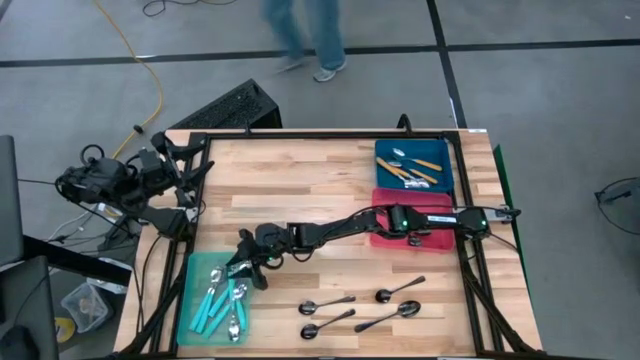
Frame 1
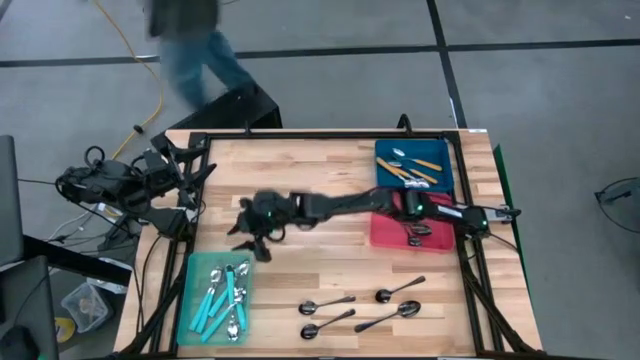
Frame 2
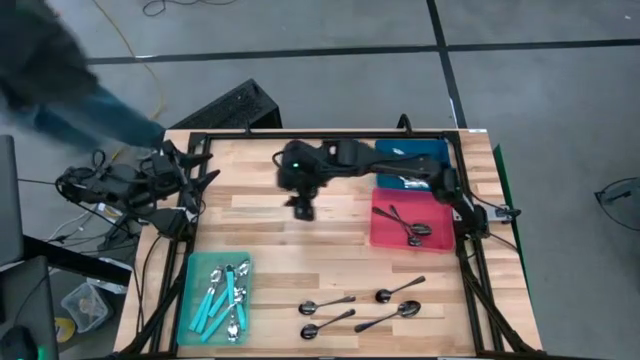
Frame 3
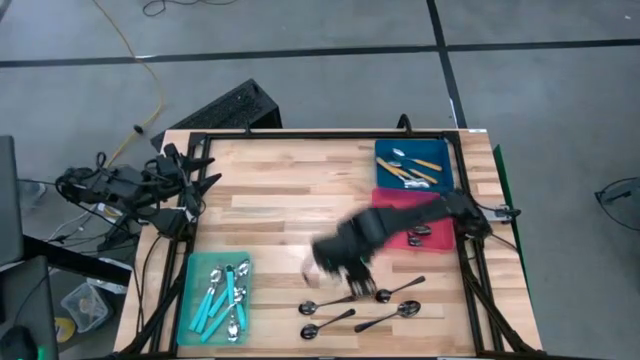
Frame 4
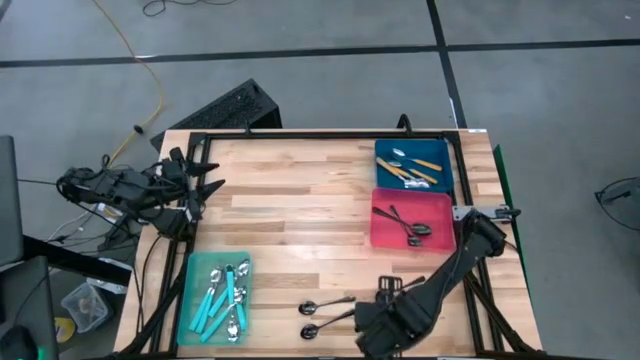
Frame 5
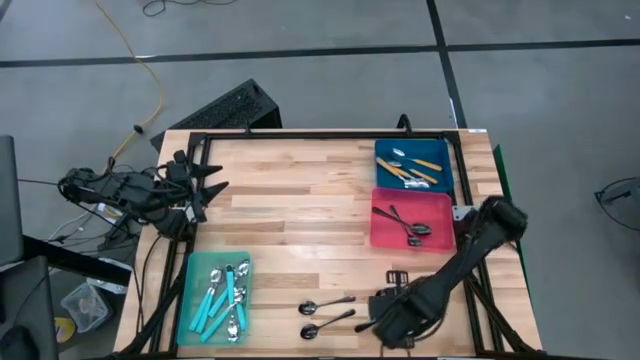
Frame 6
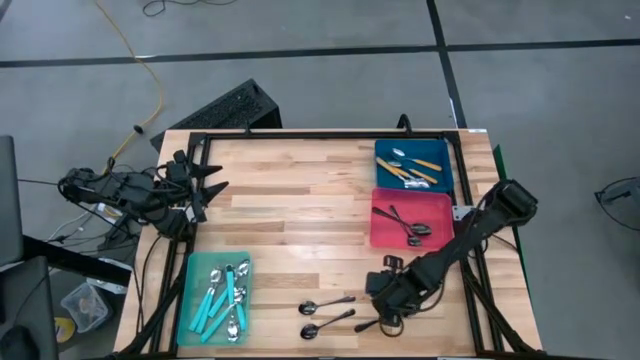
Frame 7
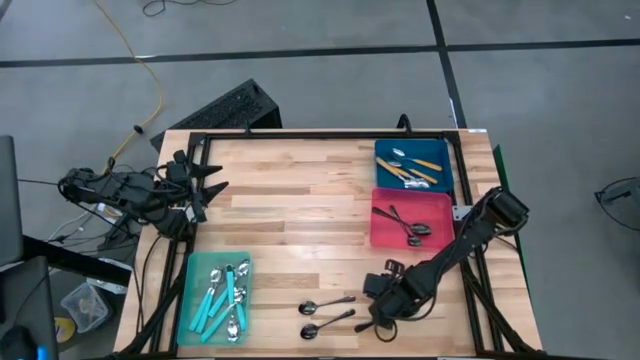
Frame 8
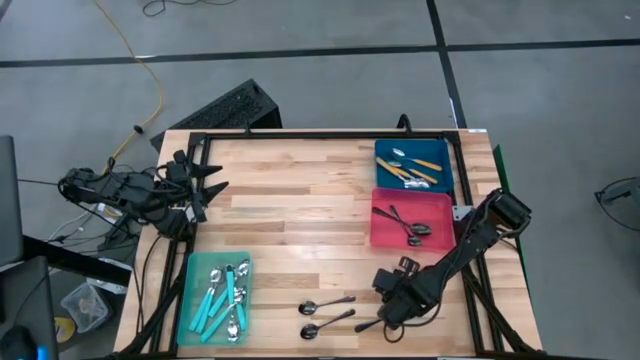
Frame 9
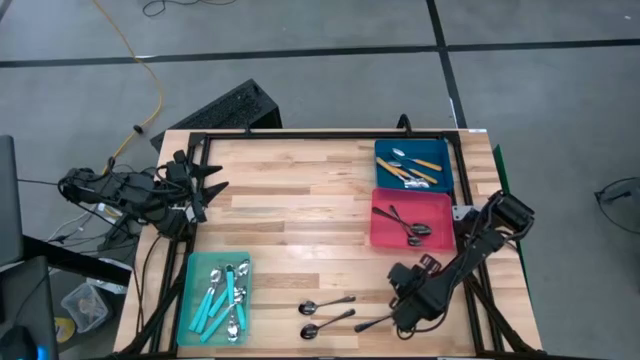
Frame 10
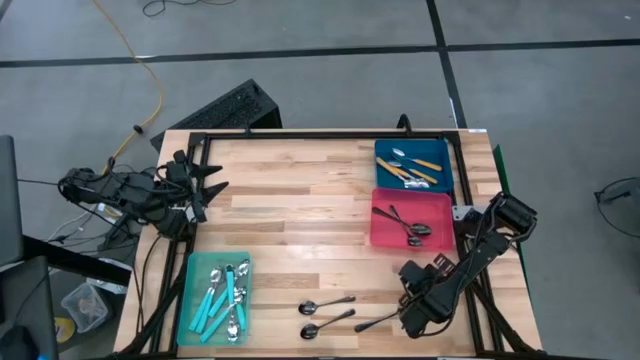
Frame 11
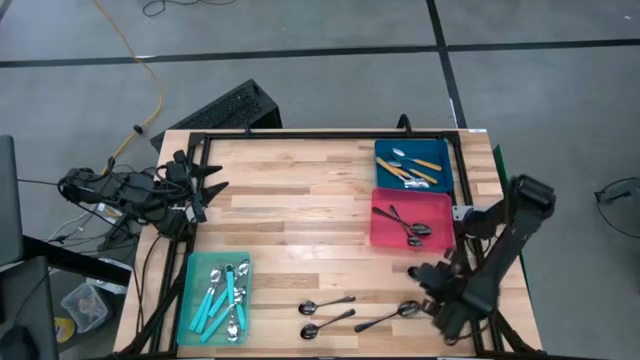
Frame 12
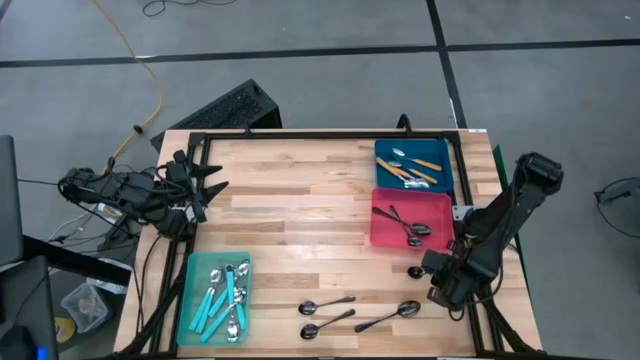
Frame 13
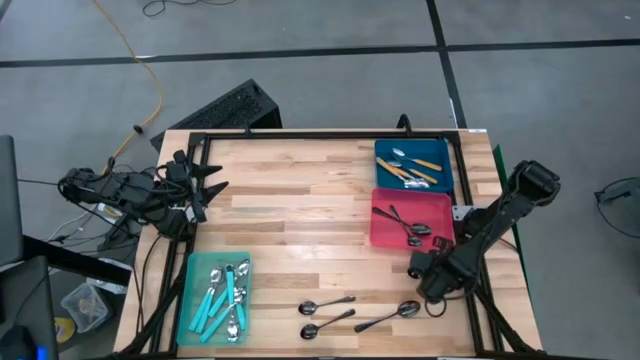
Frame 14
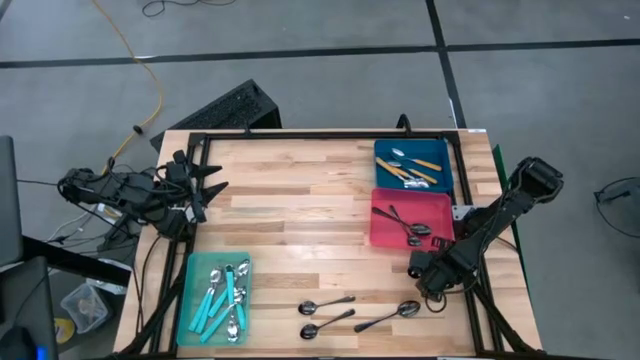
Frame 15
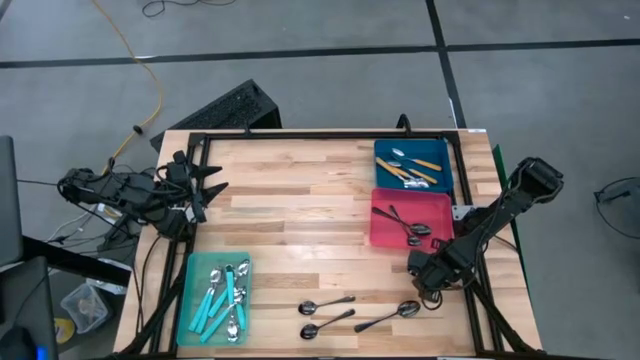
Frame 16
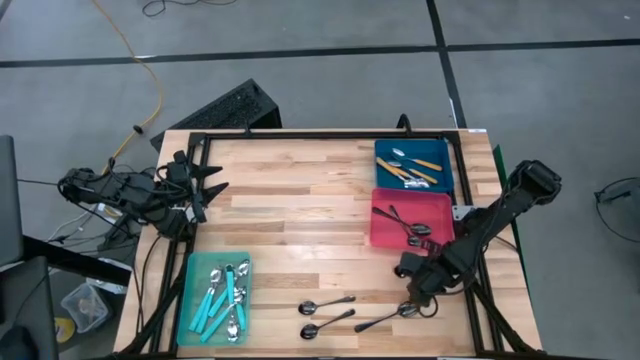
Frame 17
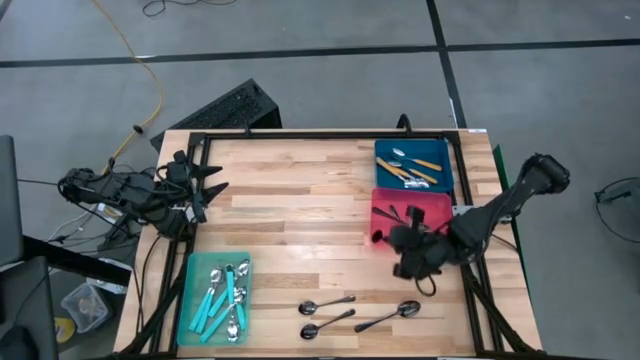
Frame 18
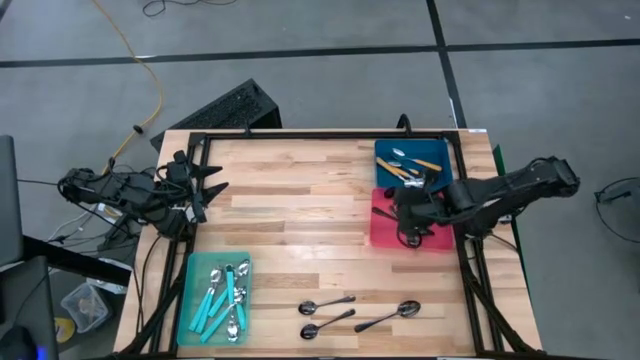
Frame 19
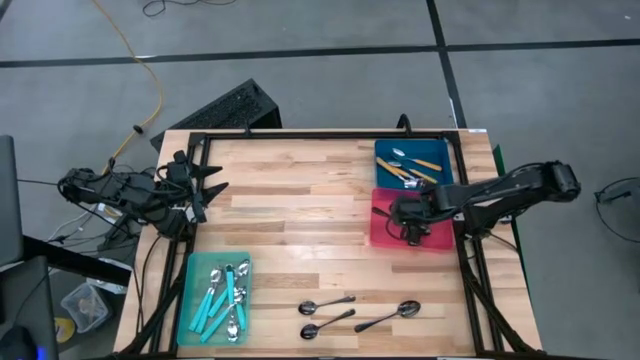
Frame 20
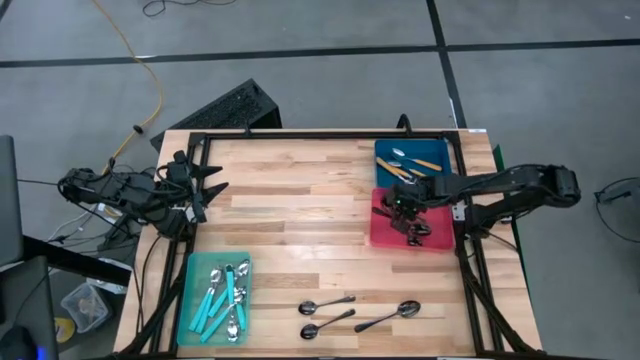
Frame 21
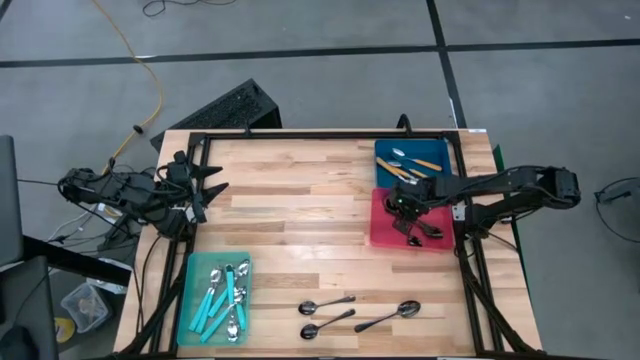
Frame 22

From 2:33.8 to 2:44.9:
Task: Sort silverware by color (type)
Put the black spoon into the red bin

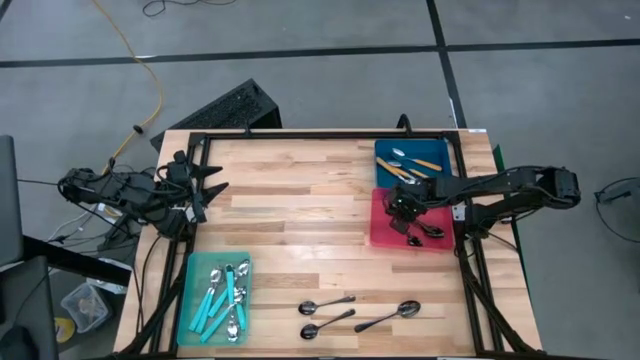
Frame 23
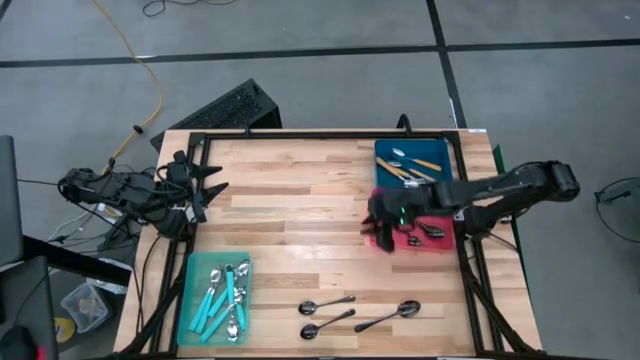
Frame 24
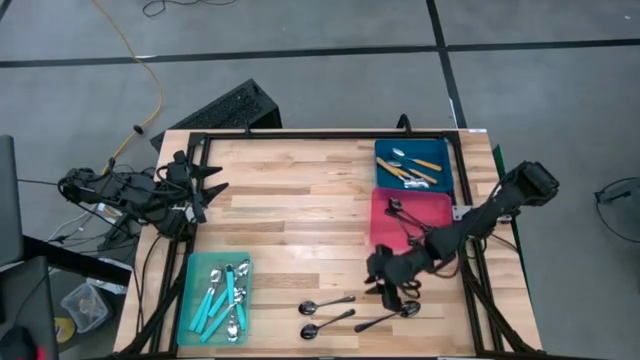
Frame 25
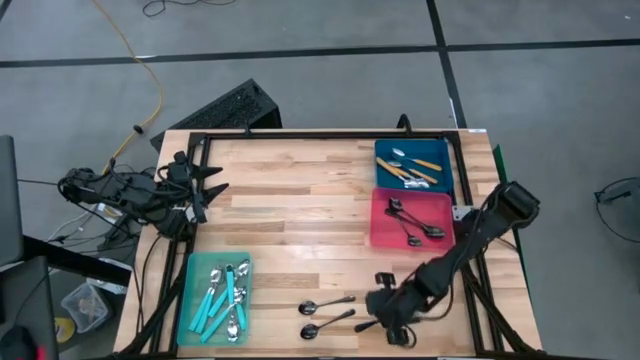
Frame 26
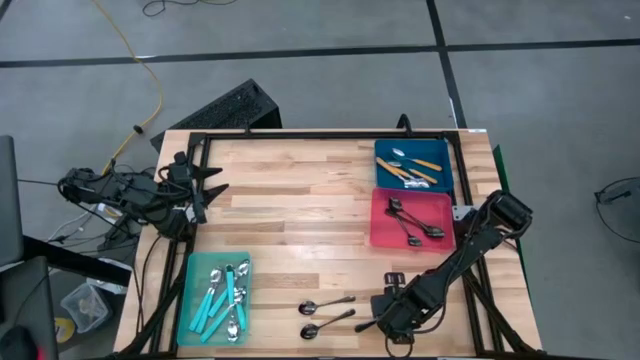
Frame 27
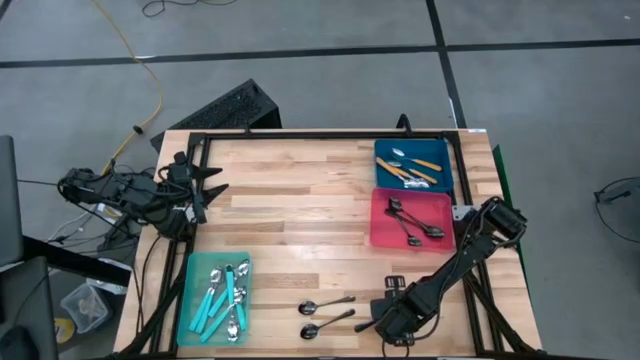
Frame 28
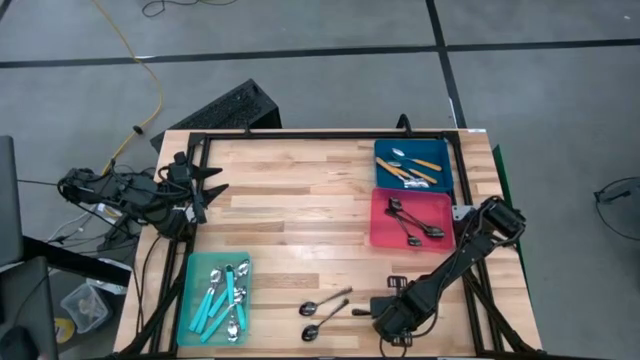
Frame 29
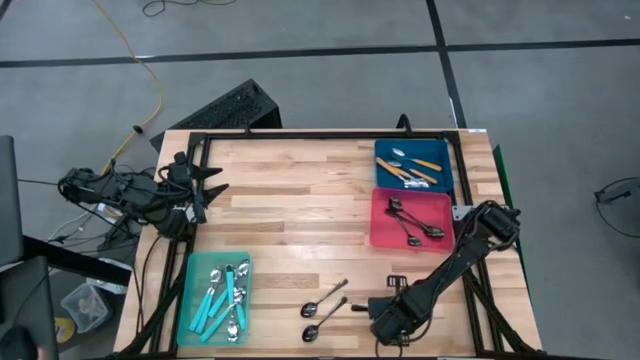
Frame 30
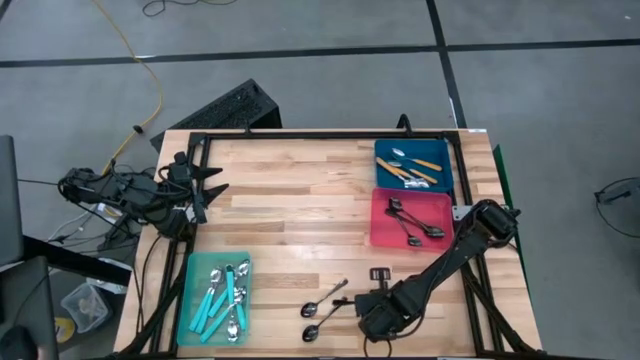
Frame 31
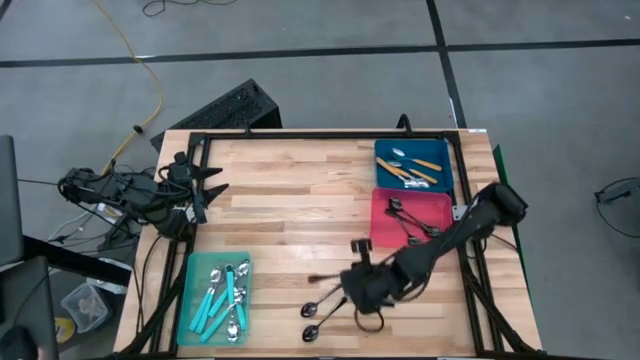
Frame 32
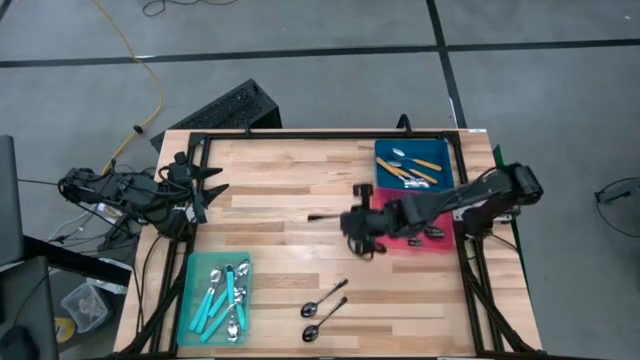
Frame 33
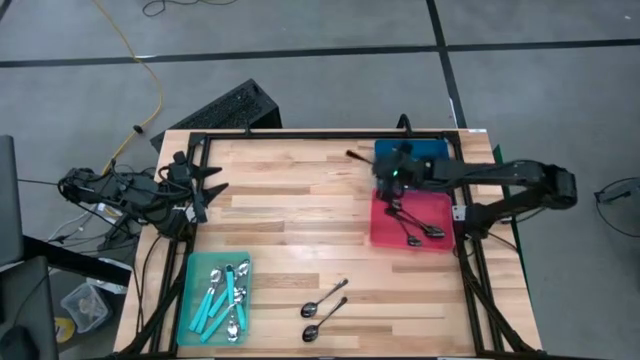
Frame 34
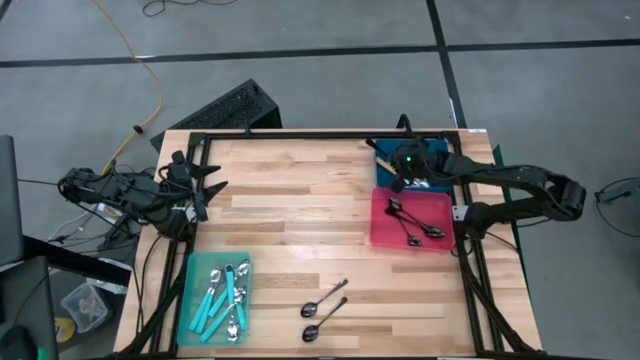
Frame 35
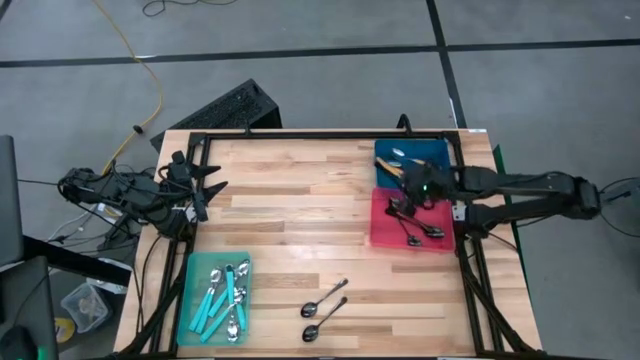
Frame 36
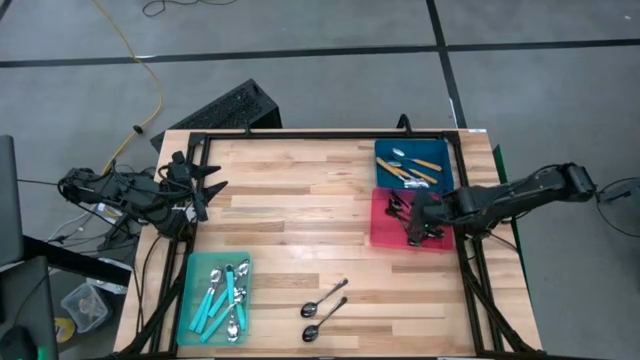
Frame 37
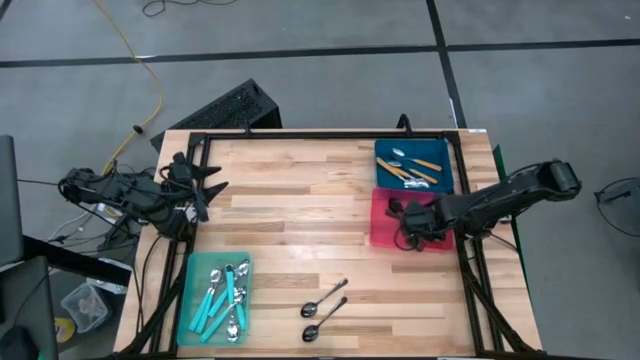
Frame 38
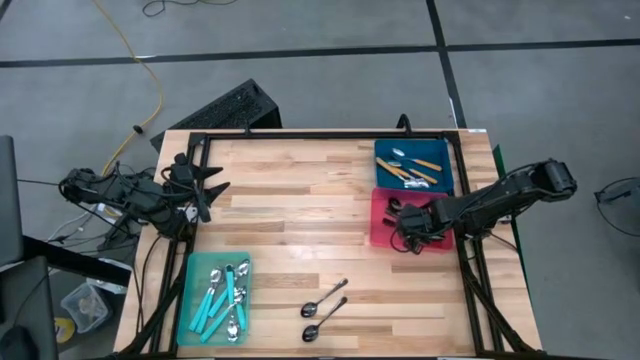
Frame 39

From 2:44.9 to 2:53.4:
Put the black spoon into the red bin

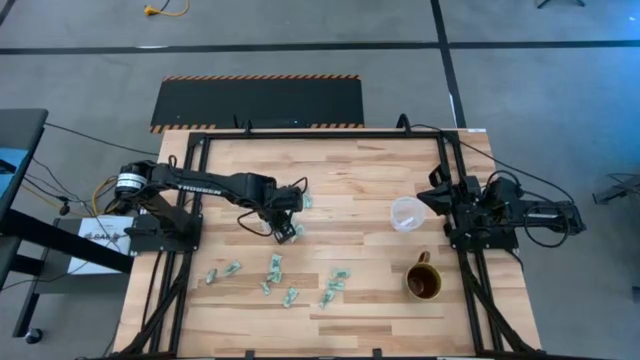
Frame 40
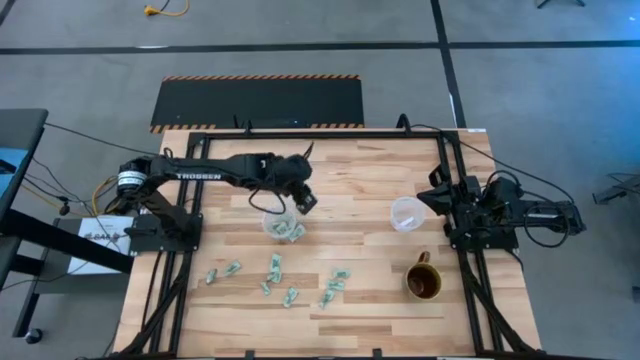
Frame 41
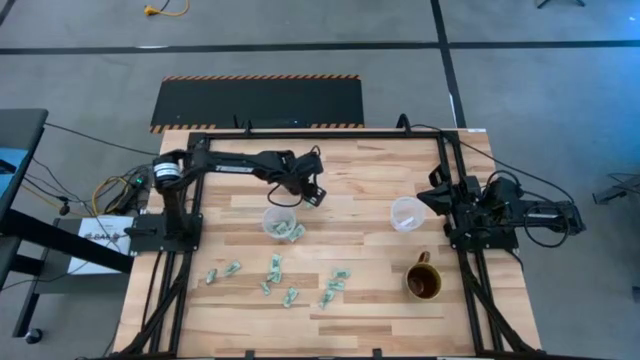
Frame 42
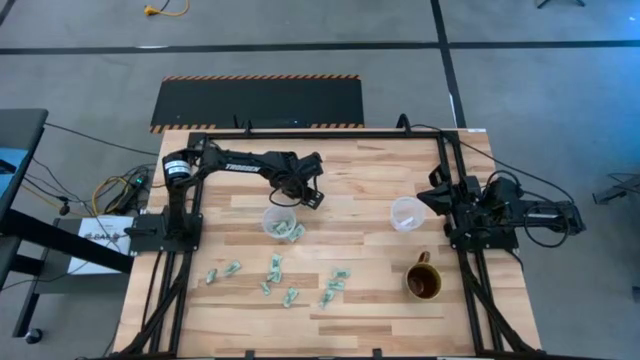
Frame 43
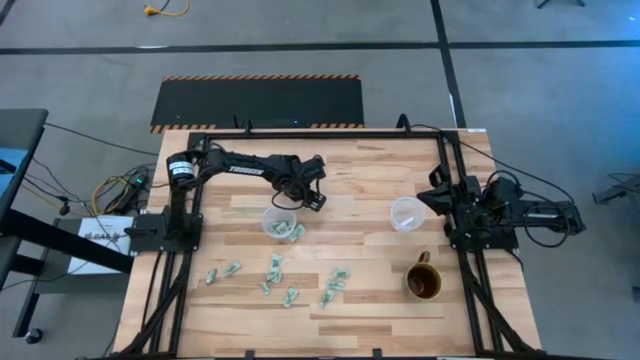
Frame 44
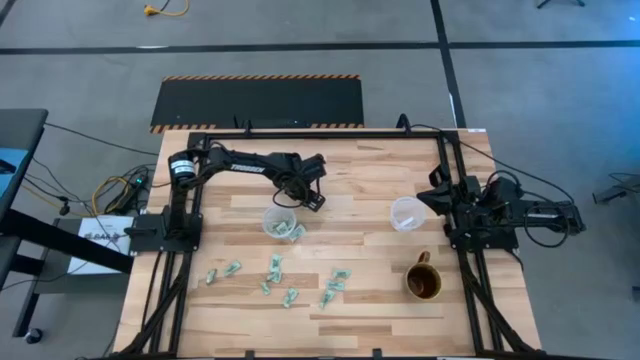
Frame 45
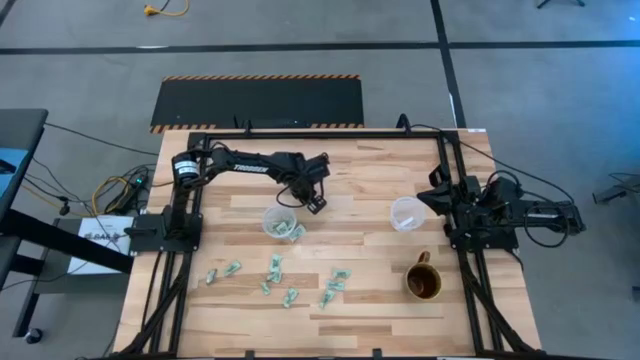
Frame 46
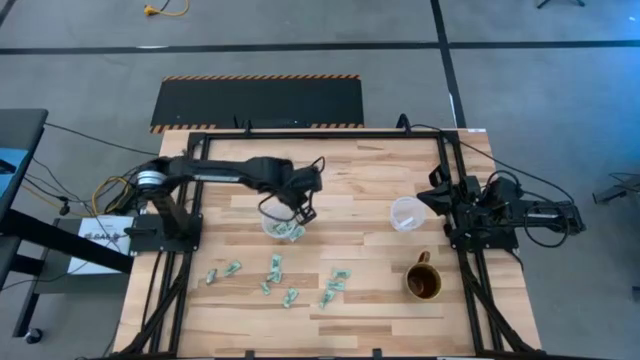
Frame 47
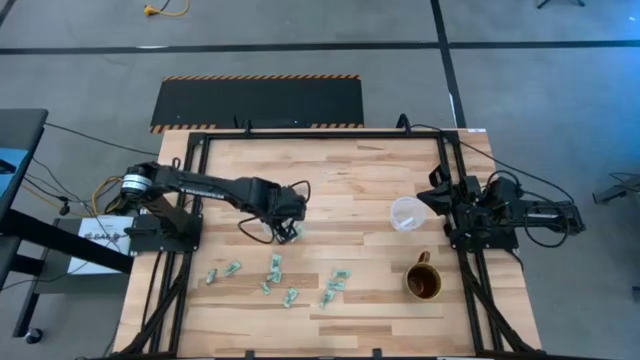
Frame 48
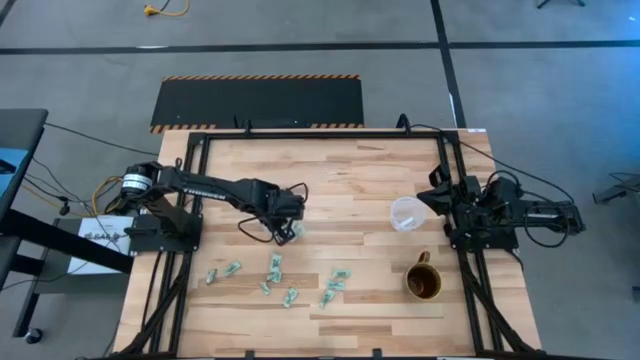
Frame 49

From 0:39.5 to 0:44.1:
Task: Pick and place Stevia / Truvia into bins
Put the white stevia packet into the left transparent container
